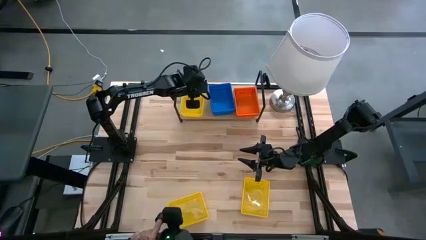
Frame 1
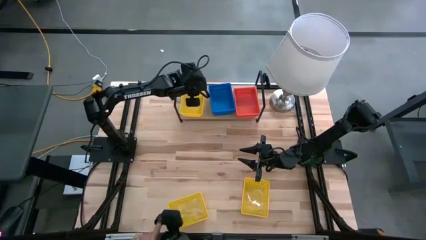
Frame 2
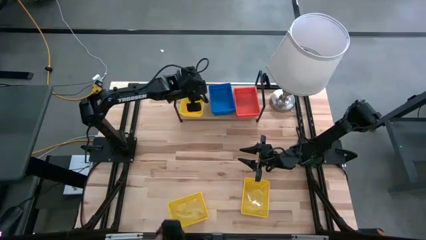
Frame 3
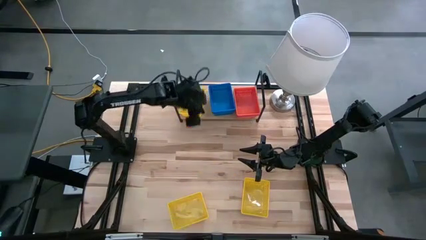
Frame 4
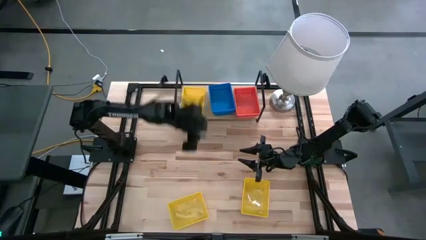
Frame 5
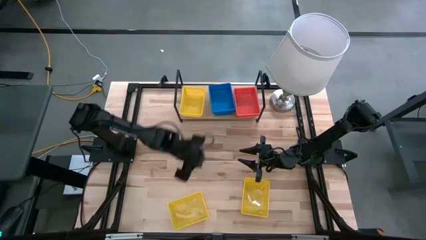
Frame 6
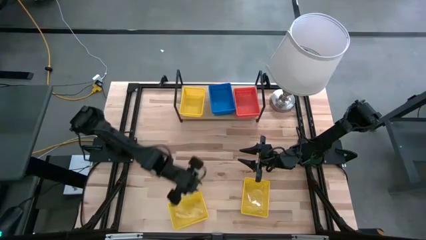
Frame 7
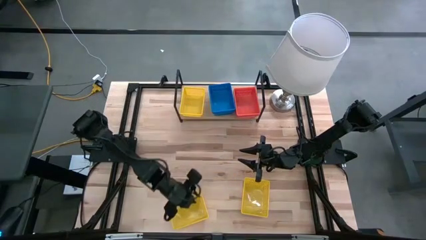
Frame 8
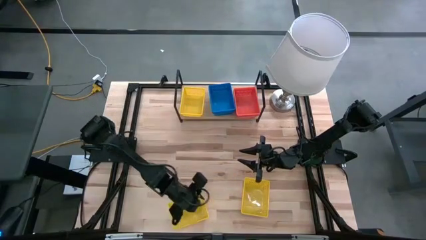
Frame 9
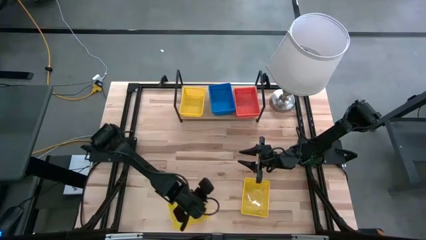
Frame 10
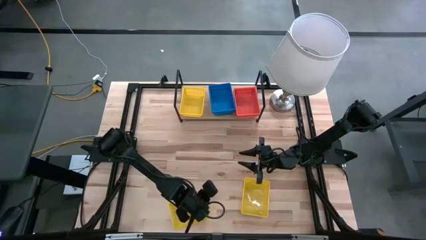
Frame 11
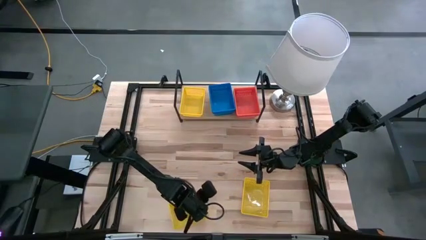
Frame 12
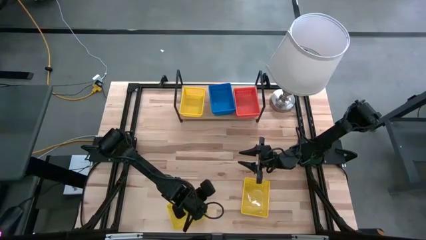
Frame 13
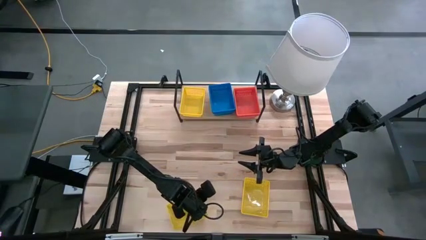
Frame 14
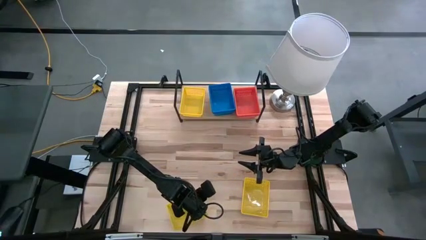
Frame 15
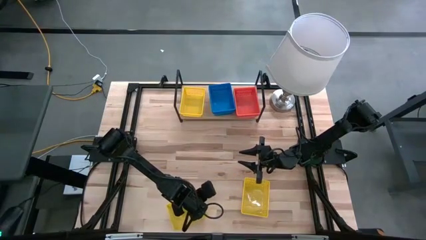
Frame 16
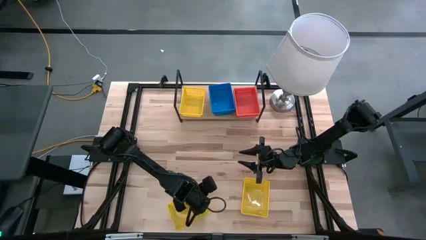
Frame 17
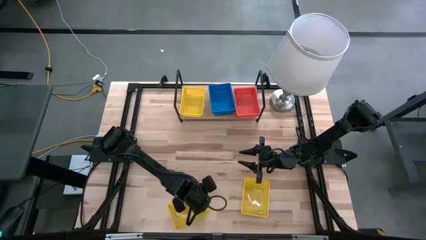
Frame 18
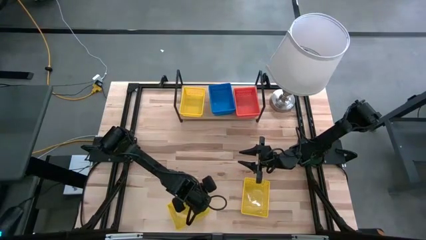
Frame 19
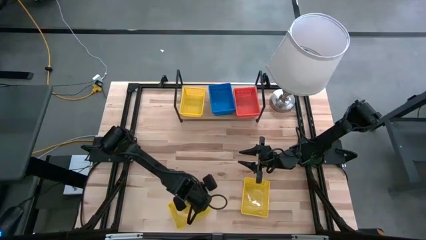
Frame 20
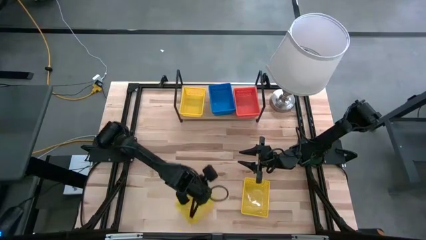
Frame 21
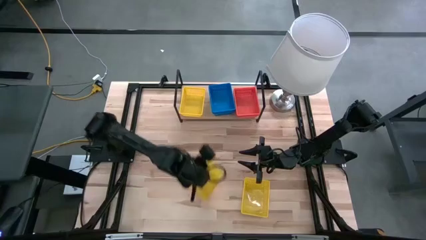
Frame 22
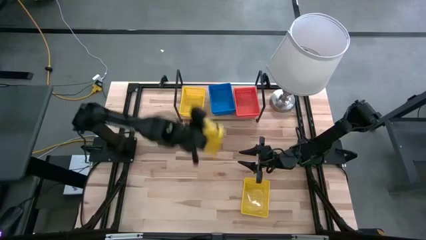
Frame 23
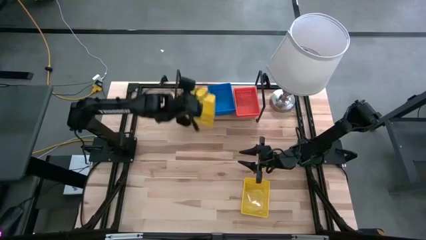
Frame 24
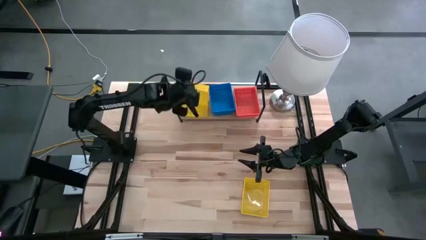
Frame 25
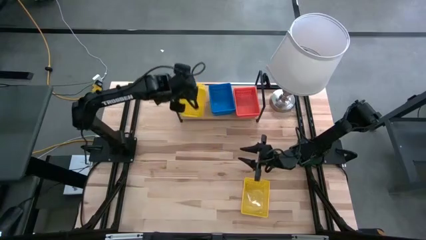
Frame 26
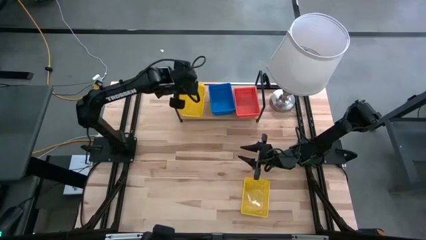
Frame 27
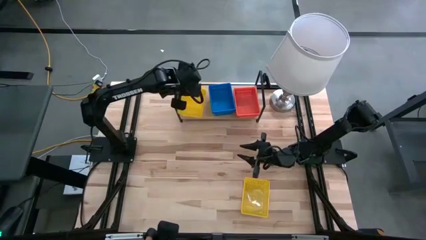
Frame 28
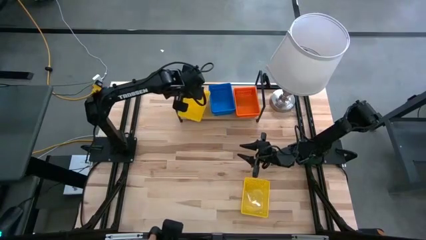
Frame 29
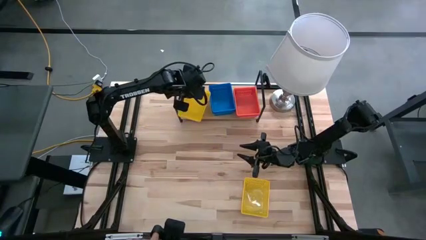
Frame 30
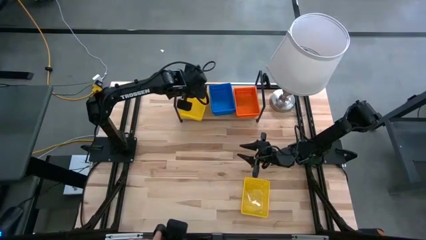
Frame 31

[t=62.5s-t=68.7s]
Task: Stack baskets on shelf by color
Stack the left yellow bin on top of the other yellow bin on the shelf

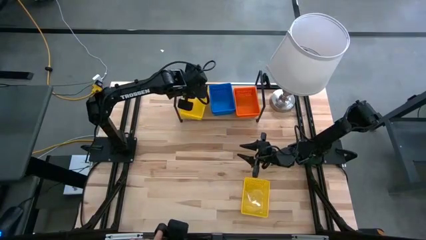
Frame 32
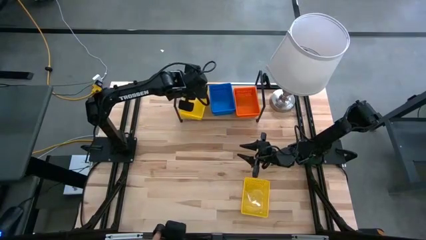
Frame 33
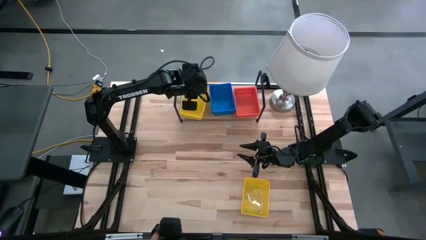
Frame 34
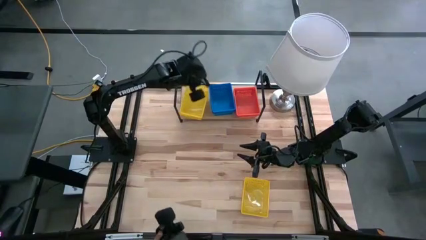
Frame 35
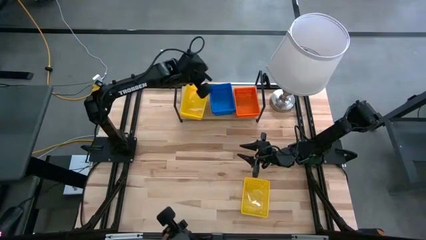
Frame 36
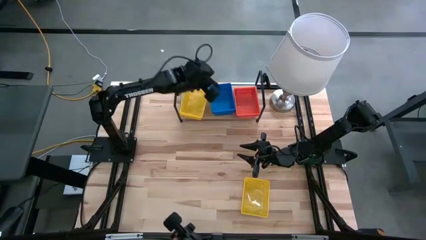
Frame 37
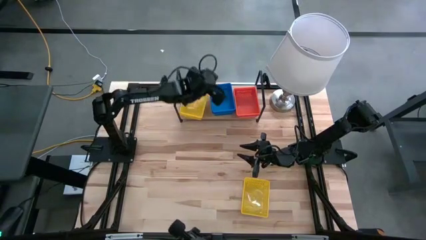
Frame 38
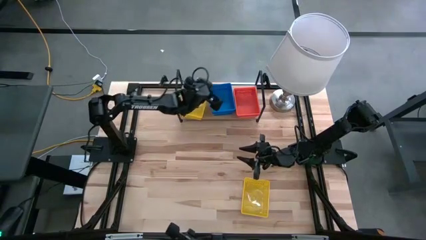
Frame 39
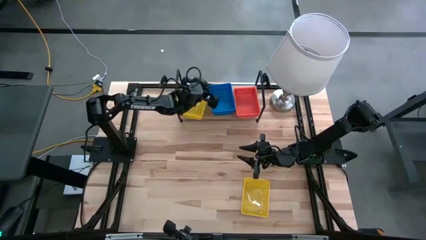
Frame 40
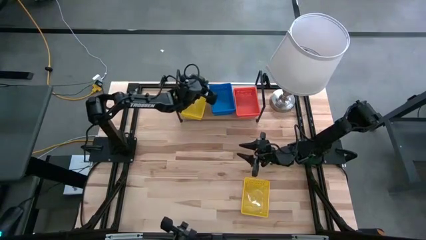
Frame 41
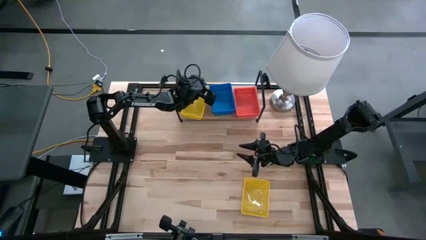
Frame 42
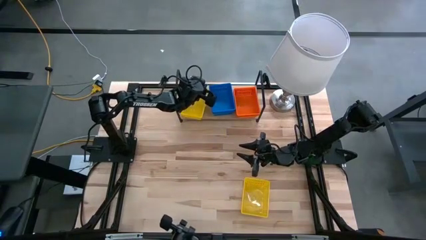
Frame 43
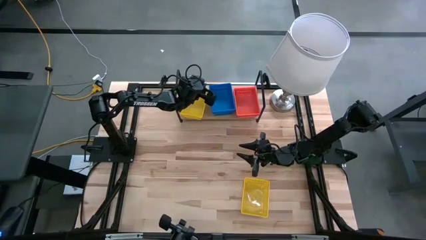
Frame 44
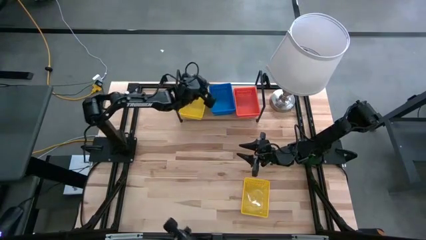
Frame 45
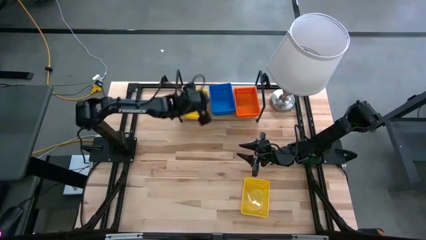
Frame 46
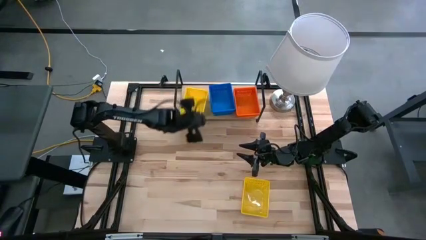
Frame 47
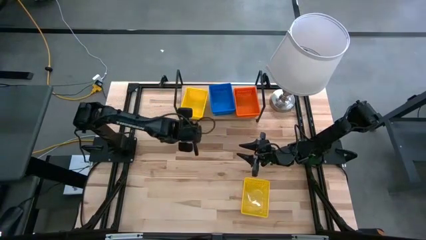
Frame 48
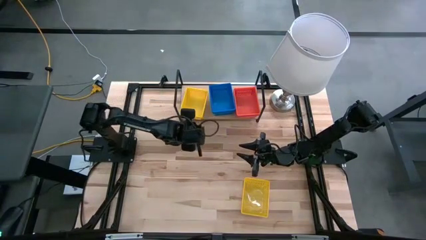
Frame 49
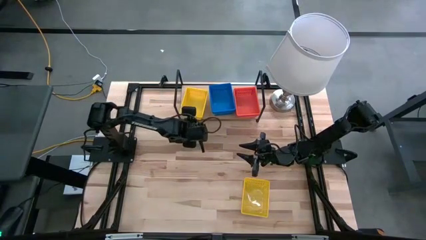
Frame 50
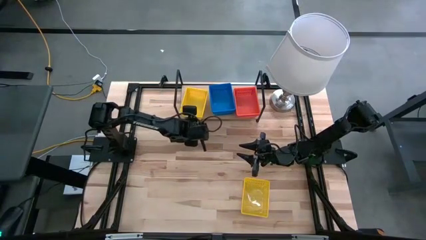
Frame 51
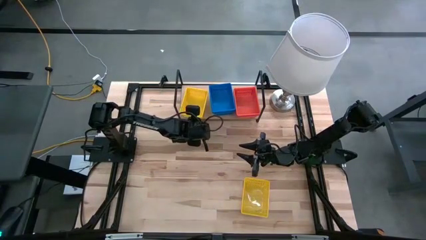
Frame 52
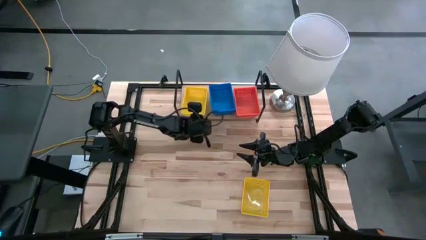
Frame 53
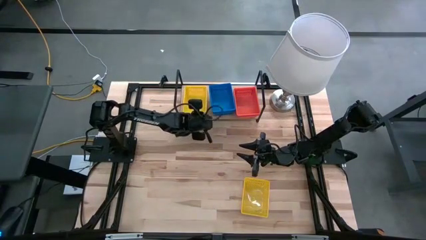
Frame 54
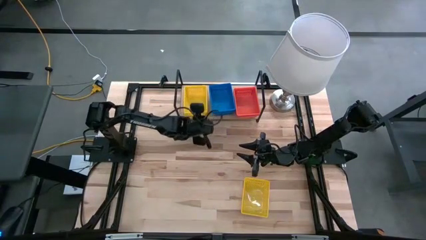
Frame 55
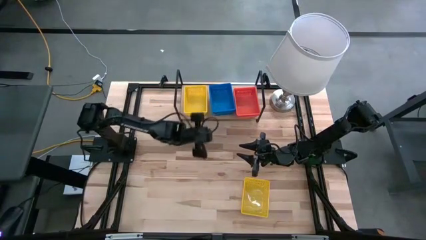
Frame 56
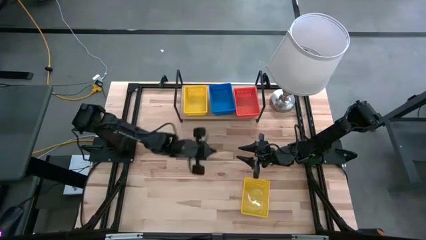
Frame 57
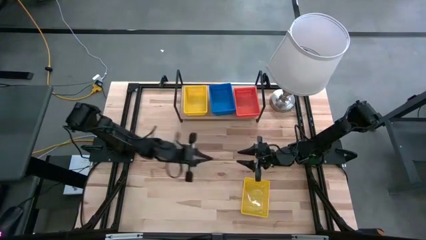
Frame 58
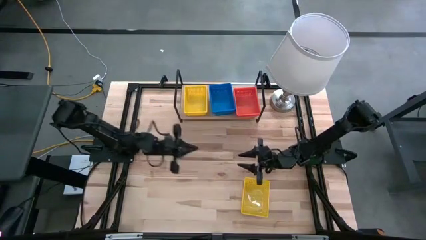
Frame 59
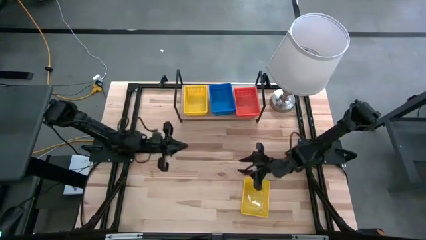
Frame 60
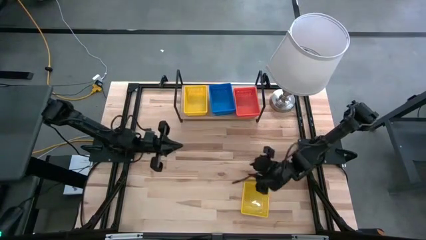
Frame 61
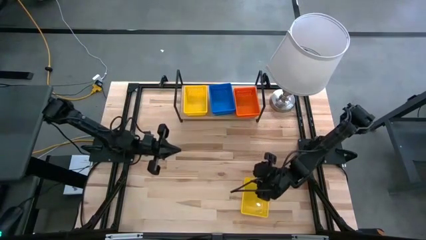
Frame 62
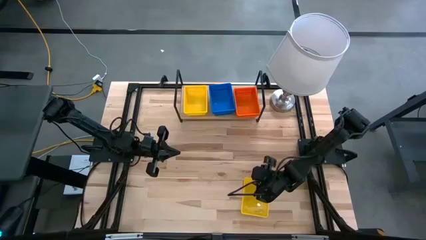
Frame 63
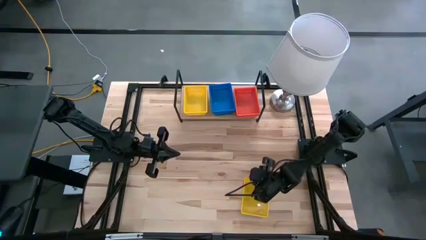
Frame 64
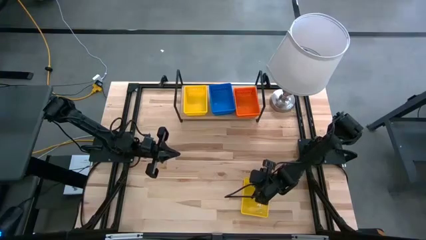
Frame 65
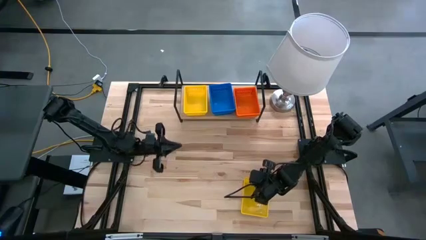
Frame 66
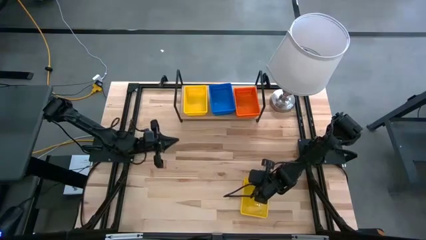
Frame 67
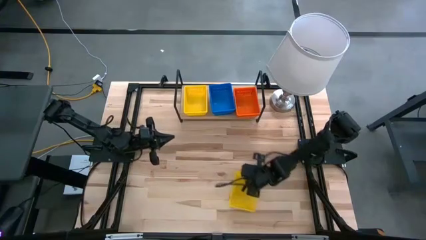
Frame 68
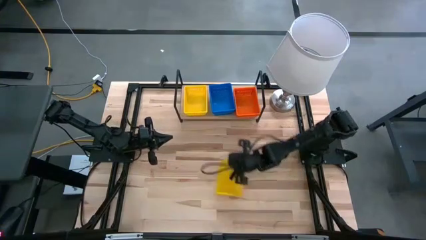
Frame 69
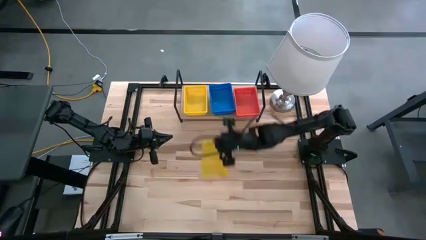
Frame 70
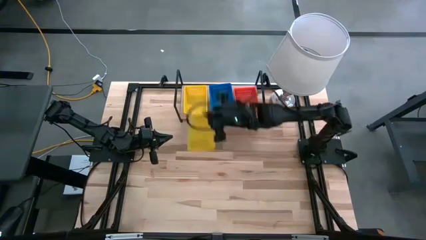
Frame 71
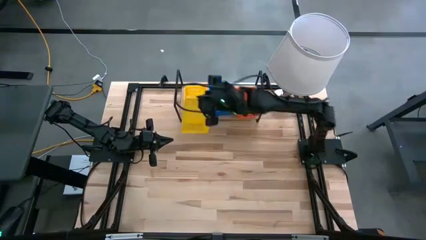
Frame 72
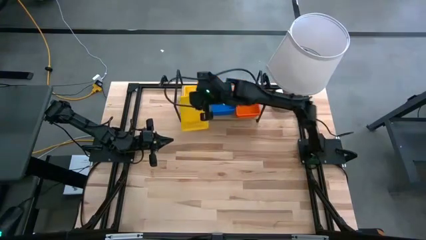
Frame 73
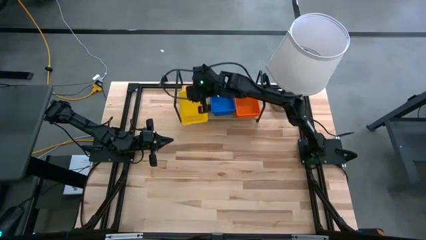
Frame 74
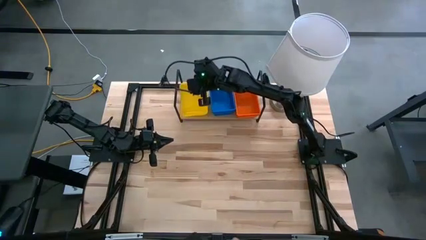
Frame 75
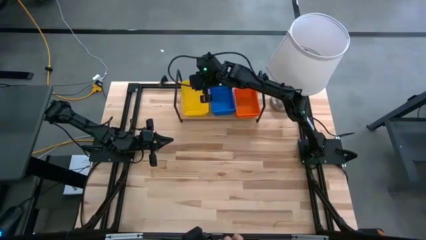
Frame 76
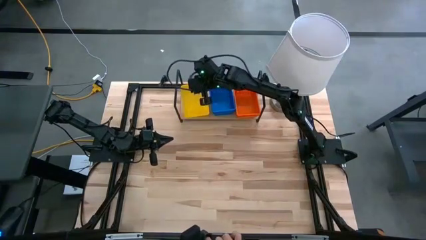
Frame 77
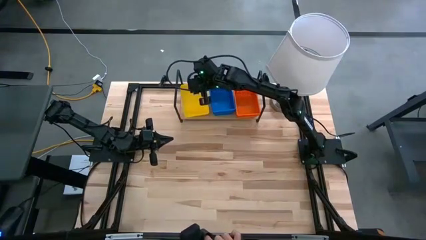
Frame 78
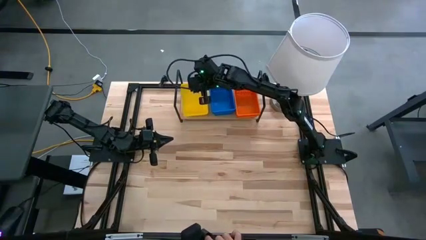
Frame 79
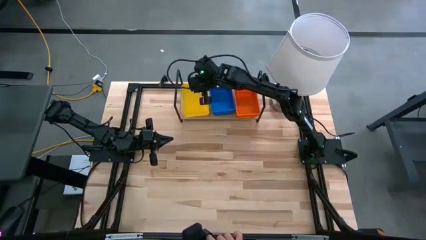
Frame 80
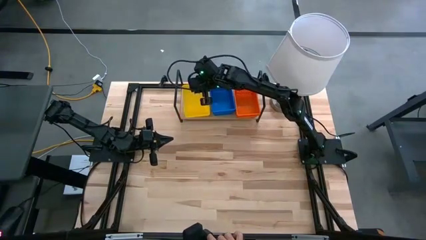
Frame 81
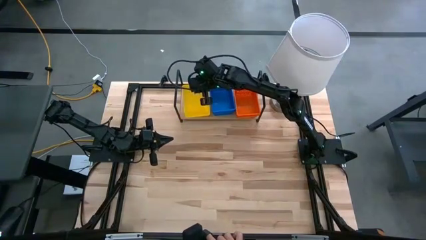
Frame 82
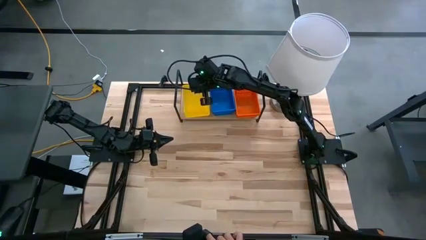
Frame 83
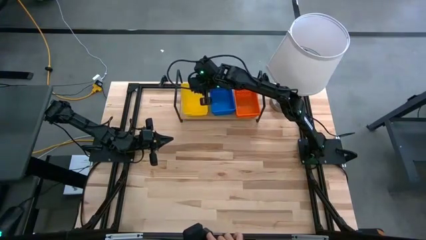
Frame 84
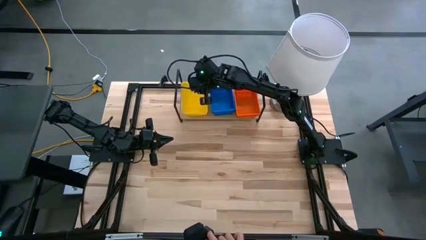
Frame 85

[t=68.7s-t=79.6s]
Stack the yellow bin on top of the other yellow bins on the shelf
